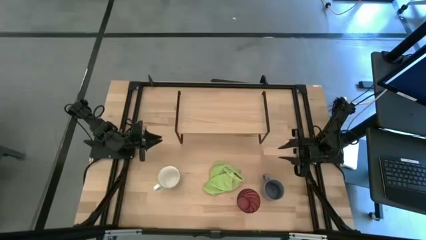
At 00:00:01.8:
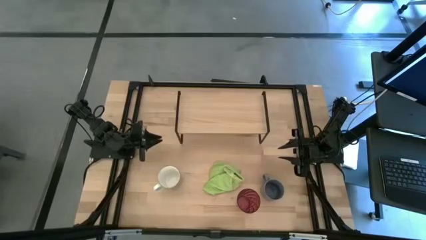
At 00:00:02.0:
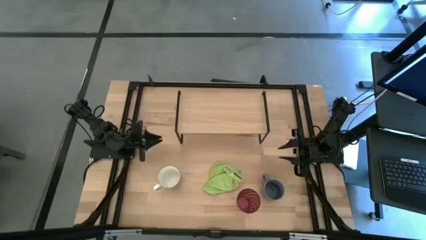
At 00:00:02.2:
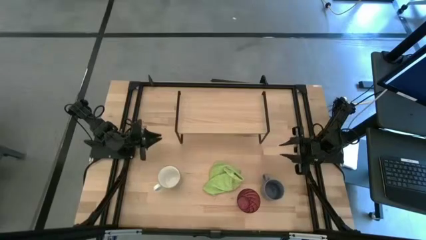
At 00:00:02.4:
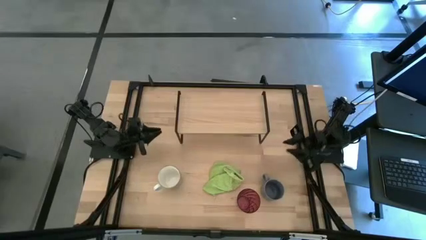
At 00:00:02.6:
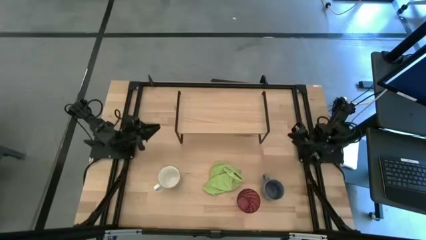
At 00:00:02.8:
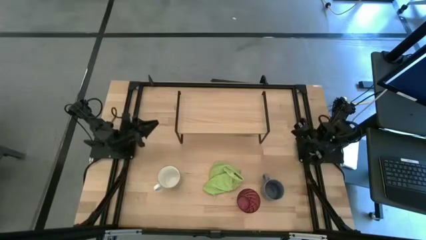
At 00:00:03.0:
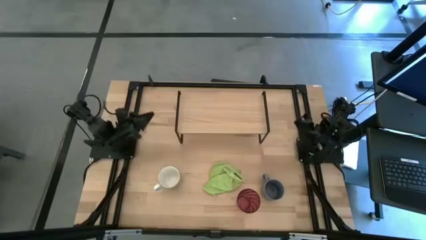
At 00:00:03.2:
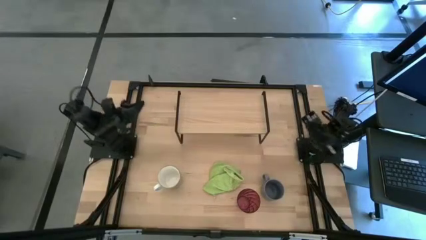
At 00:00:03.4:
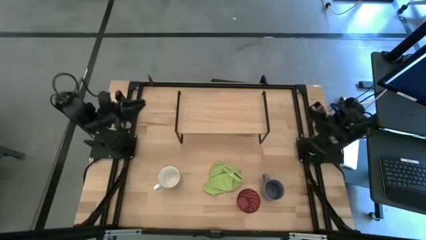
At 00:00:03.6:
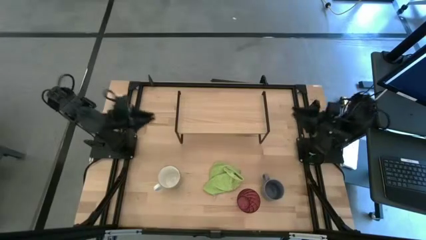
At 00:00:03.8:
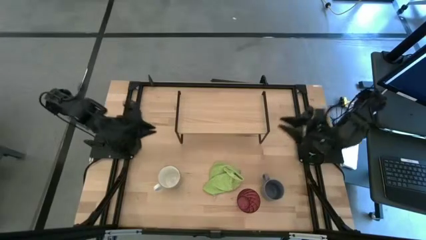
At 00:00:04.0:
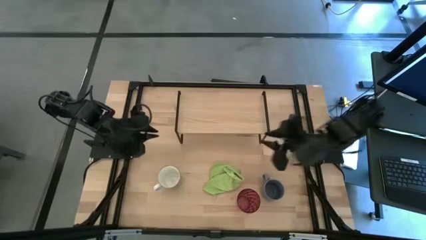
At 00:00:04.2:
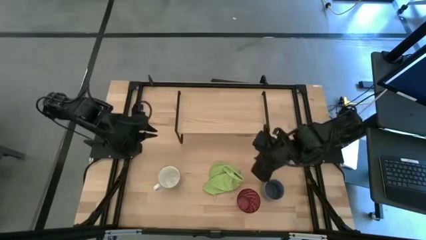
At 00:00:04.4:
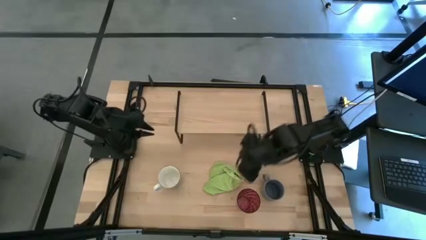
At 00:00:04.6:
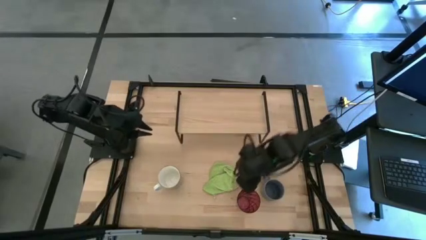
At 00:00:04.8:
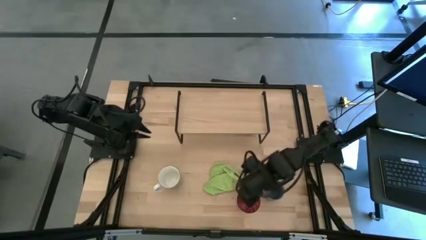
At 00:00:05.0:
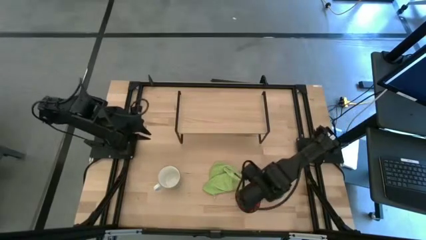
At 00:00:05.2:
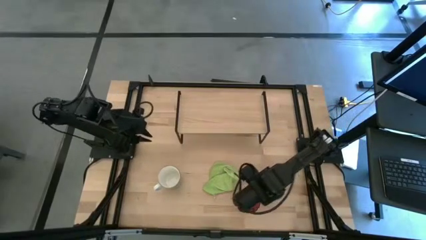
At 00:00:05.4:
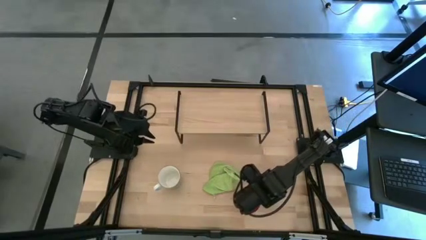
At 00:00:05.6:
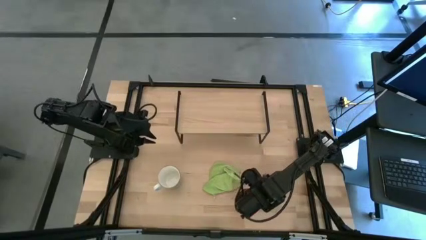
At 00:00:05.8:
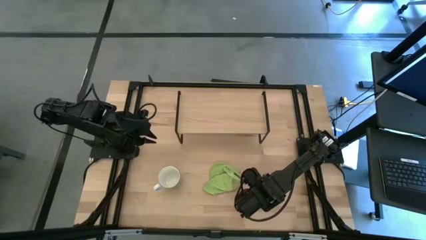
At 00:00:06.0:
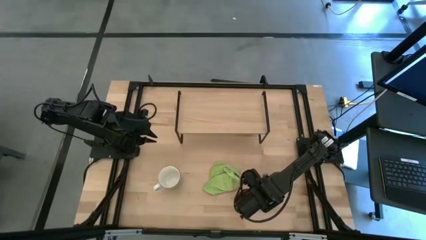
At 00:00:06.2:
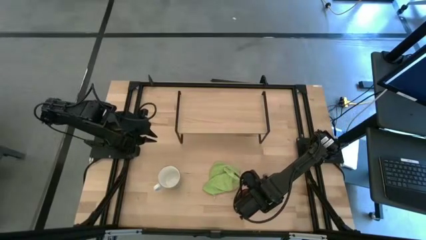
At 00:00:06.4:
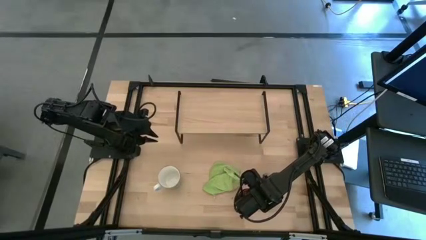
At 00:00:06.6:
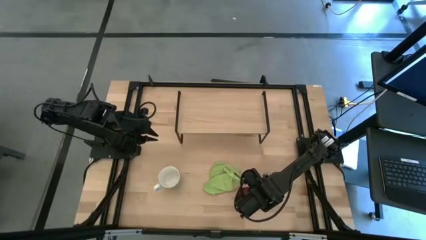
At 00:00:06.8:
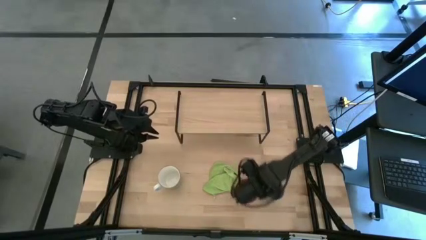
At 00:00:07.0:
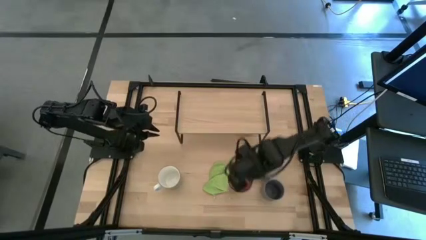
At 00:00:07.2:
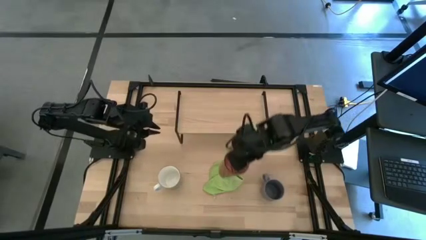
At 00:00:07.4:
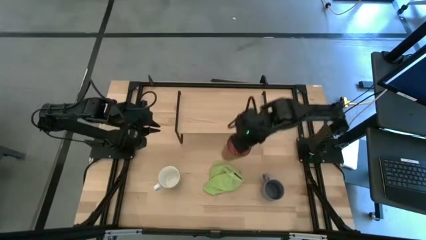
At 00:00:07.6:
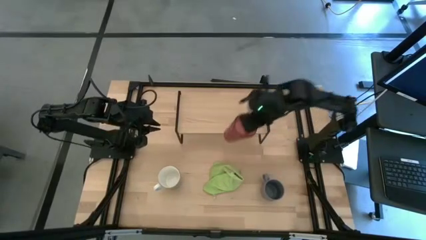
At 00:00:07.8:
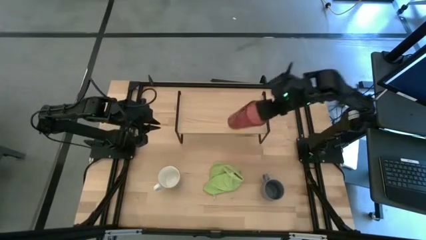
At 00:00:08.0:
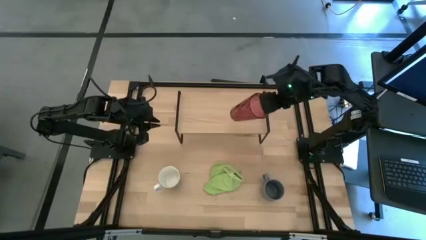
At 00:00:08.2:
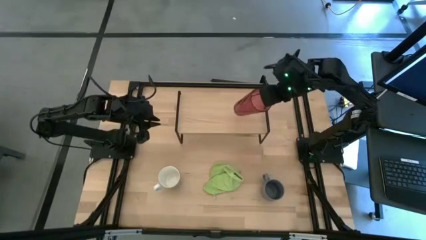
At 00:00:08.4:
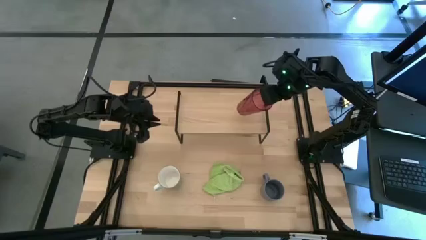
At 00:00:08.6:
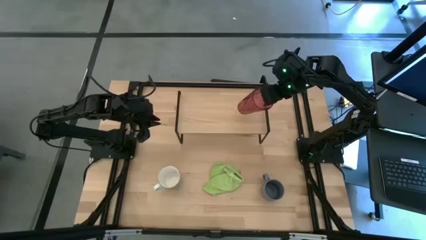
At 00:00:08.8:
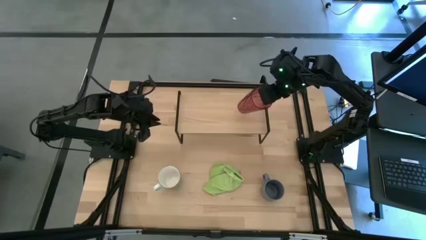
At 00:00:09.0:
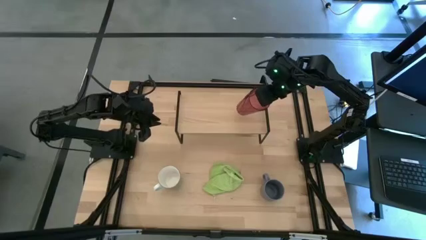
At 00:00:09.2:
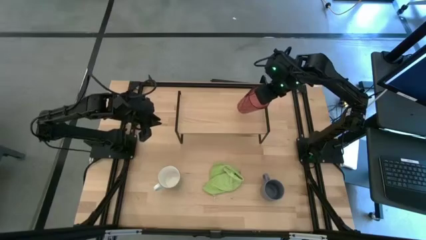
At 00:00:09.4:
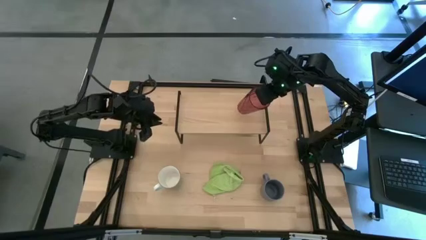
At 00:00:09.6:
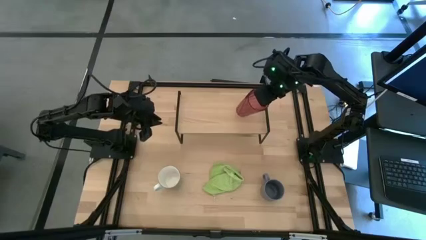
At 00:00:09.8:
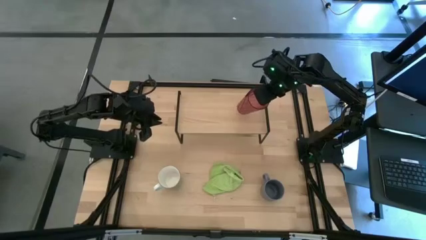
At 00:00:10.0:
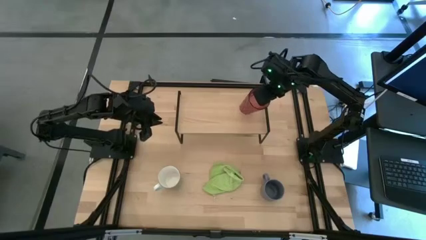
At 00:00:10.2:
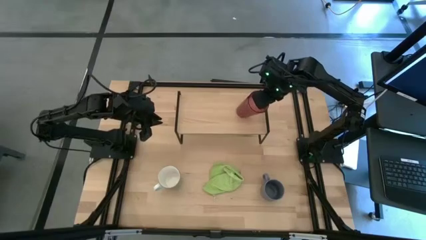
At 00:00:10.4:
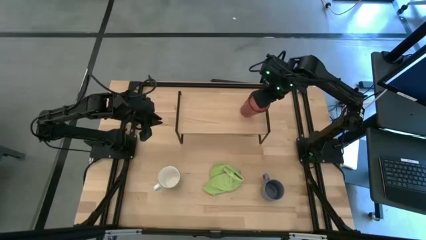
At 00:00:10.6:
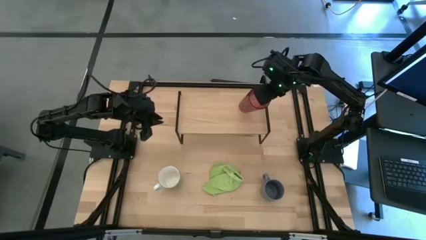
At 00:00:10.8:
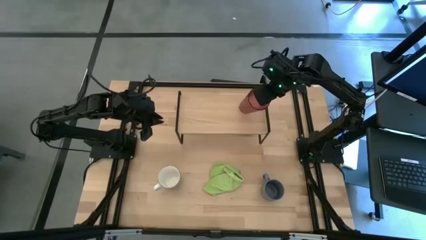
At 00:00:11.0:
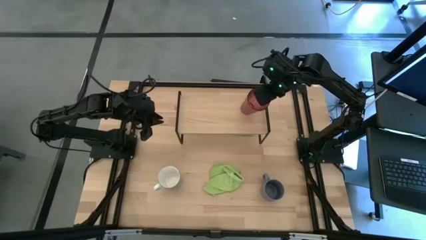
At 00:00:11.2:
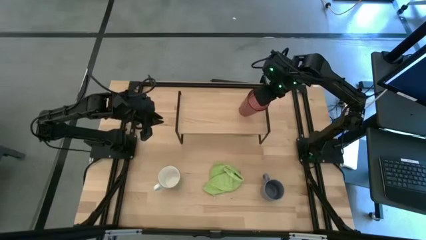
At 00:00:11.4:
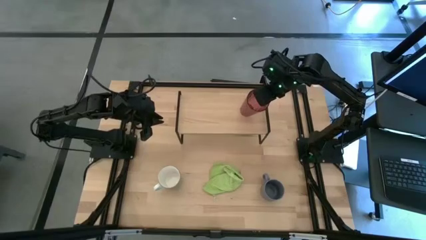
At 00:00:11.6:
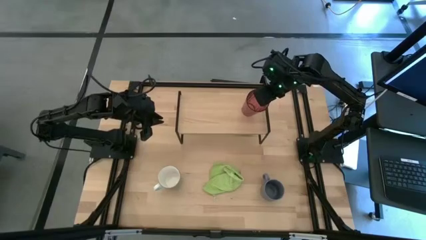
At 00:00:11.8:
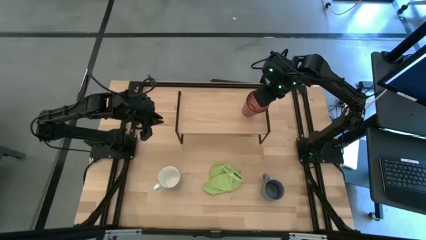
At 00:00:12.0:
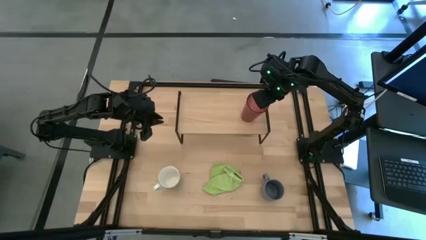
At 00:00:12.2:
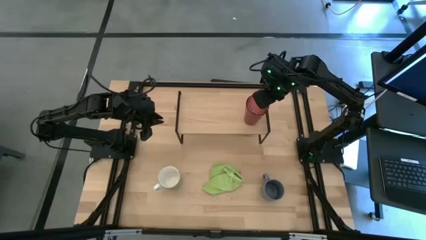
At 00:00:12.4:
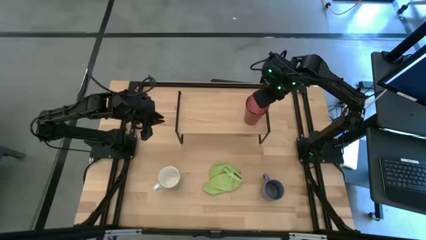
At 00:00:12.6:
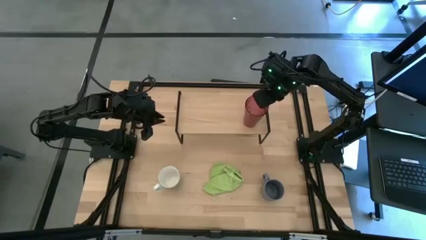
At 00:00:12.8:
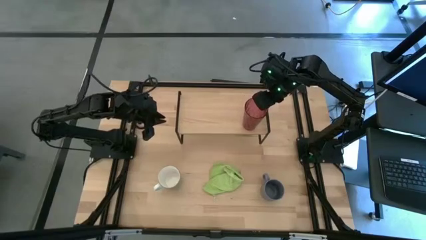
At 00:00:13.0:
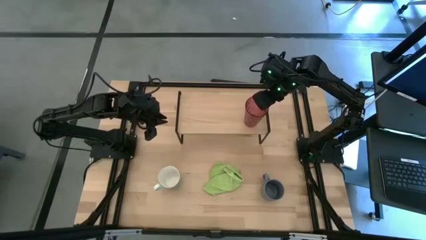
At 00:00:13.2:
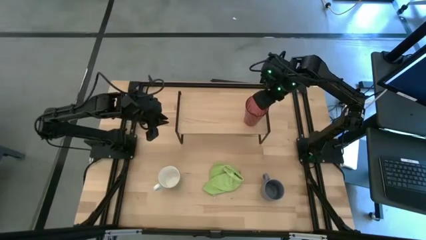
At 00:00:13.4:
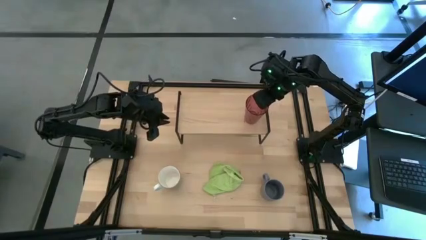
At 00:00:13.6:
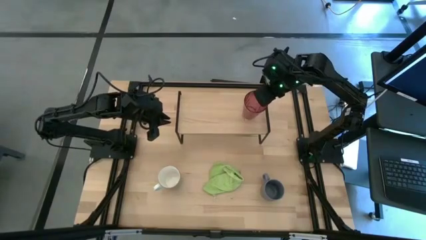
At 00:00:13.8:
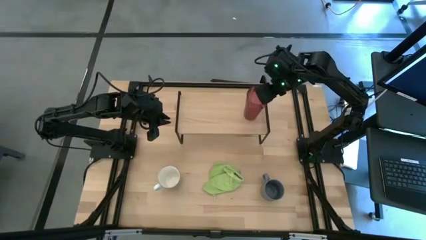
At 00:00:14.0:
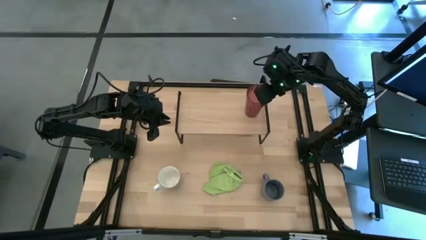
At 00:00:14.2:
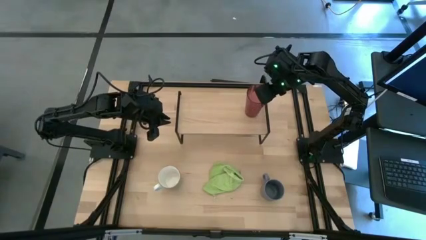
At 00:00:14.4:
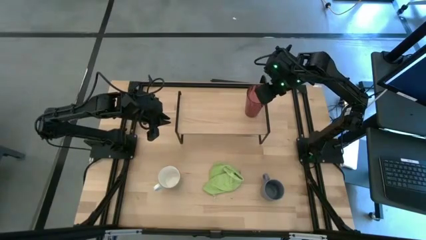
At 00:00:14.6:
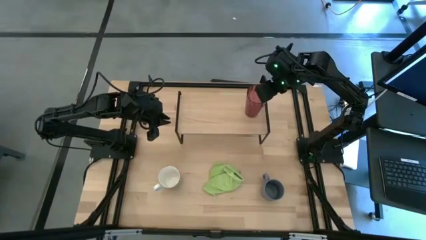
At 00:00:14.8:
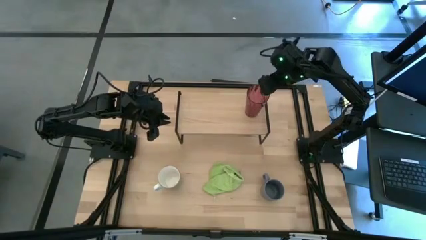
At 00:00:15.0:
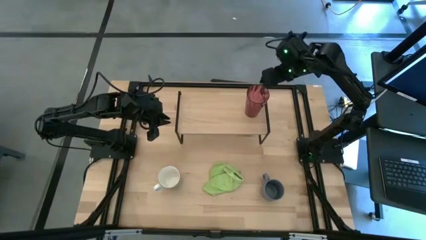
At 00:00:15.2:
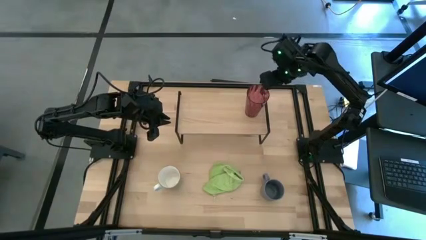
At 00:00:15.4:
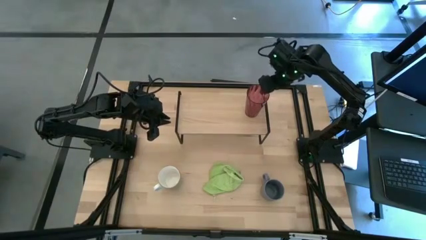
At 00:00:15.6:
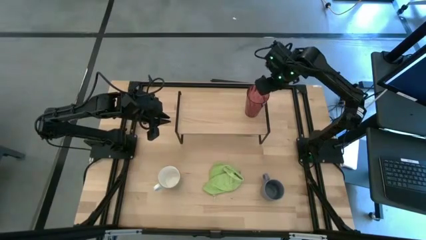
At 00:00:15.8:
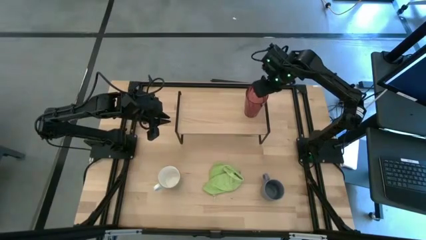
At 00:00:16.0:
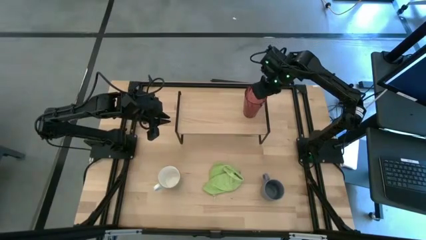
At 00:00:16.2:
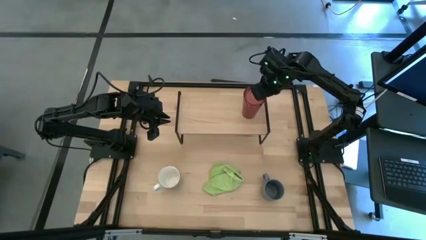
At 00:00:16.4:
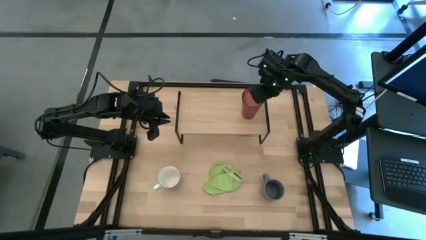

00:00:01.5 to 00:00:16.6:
Task: Stack small to large cups/mugs on shelf
Put the red cup on the shelf
